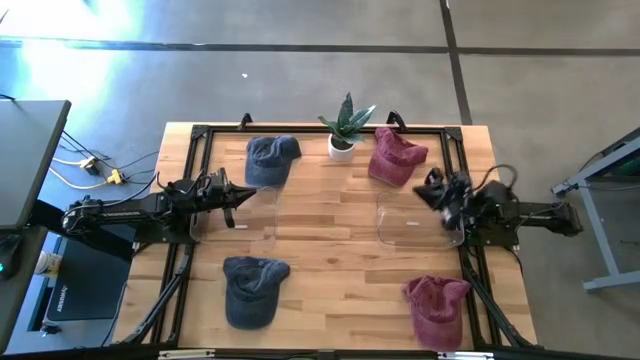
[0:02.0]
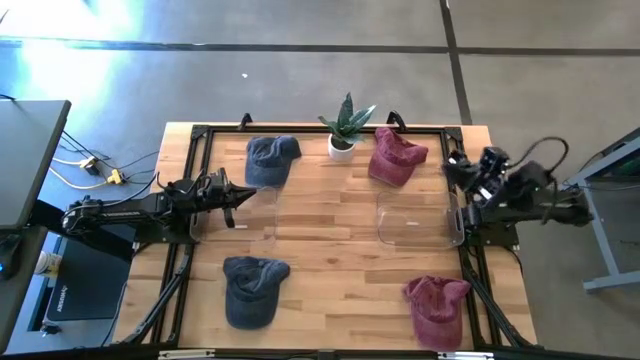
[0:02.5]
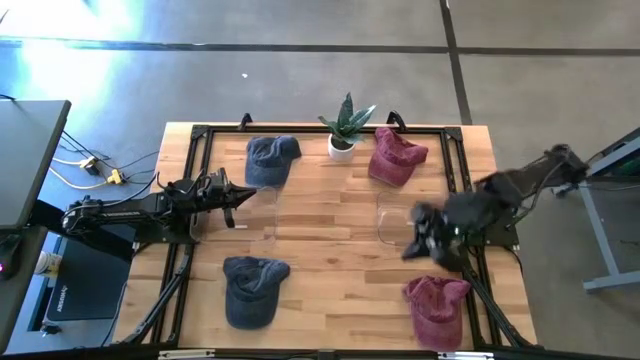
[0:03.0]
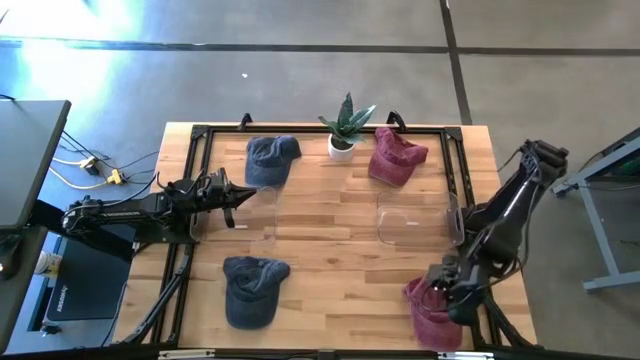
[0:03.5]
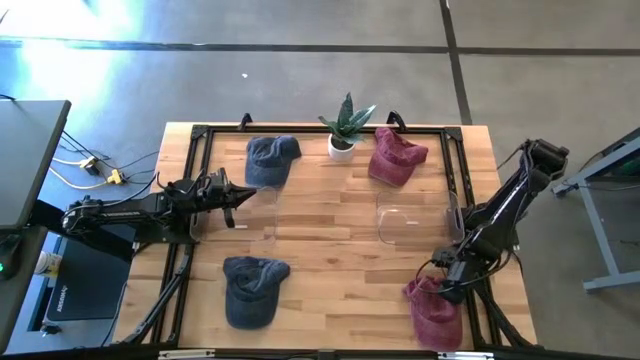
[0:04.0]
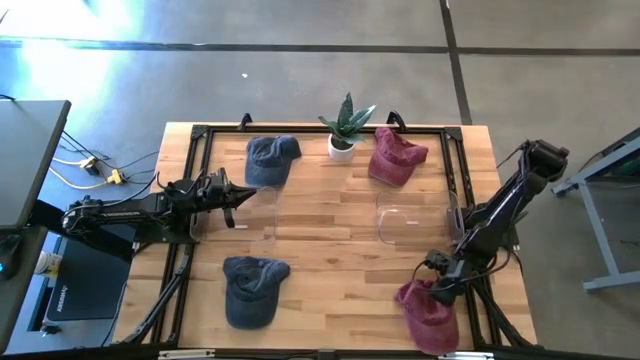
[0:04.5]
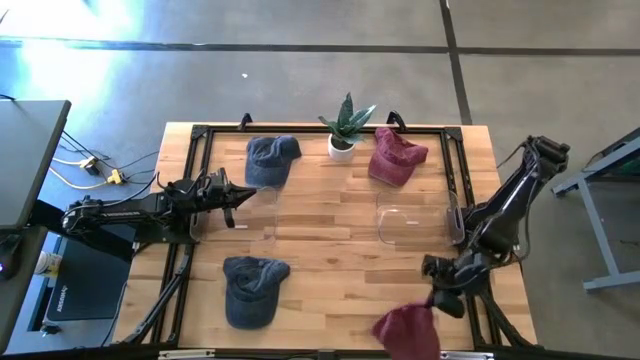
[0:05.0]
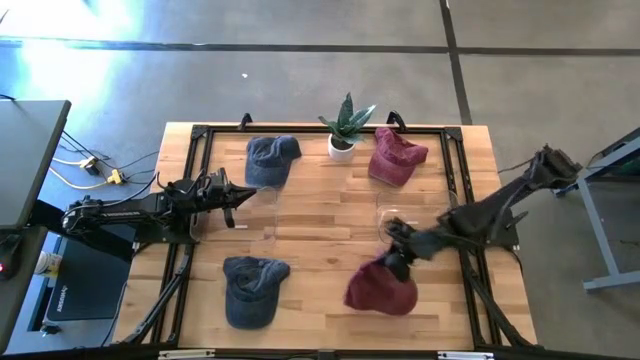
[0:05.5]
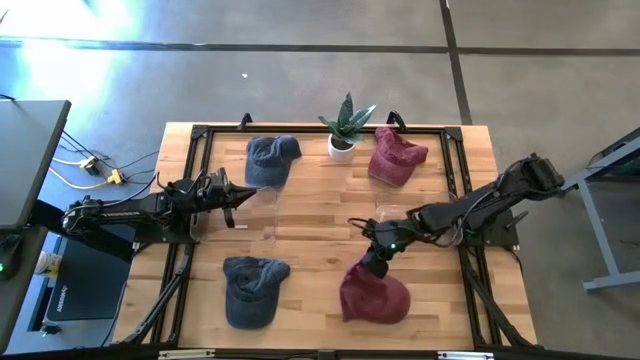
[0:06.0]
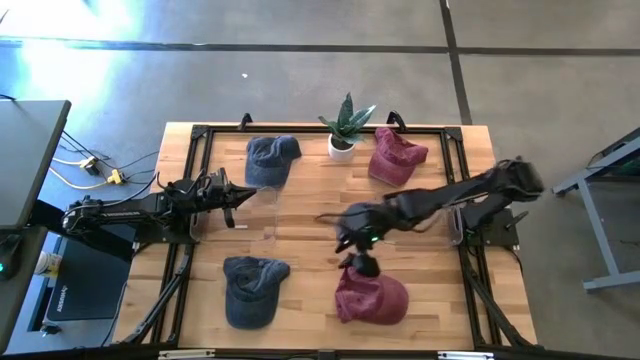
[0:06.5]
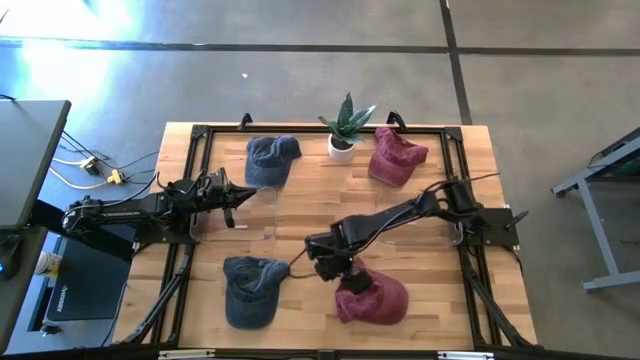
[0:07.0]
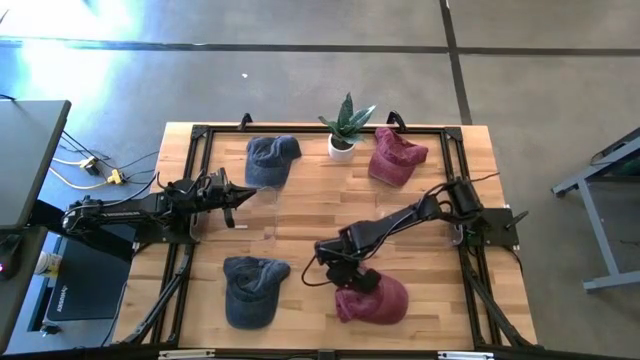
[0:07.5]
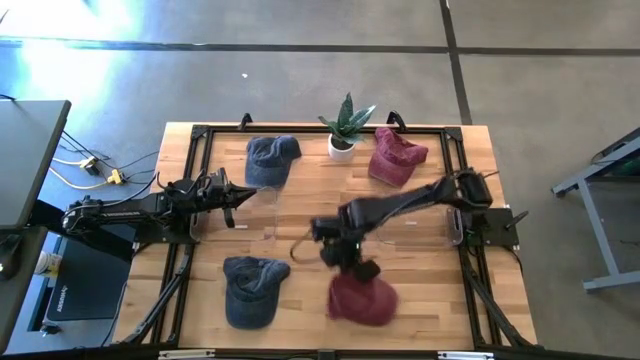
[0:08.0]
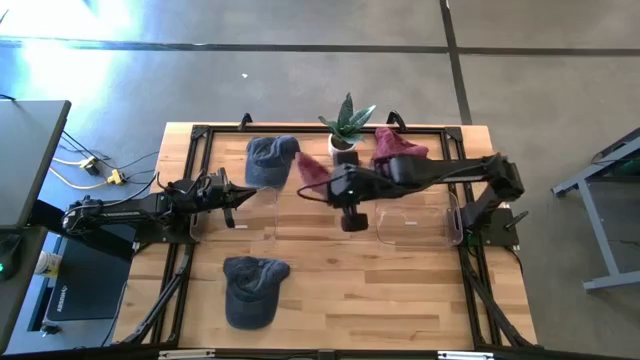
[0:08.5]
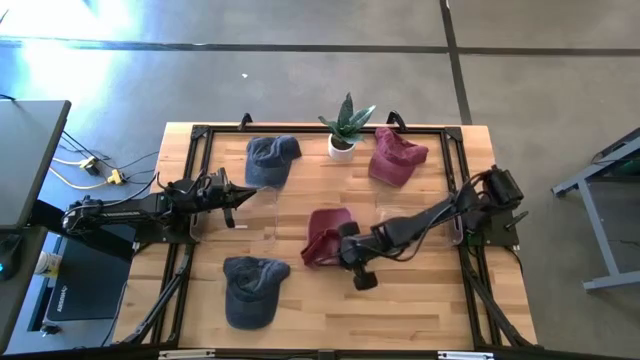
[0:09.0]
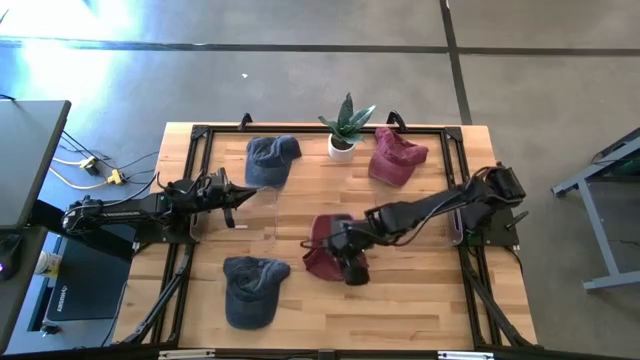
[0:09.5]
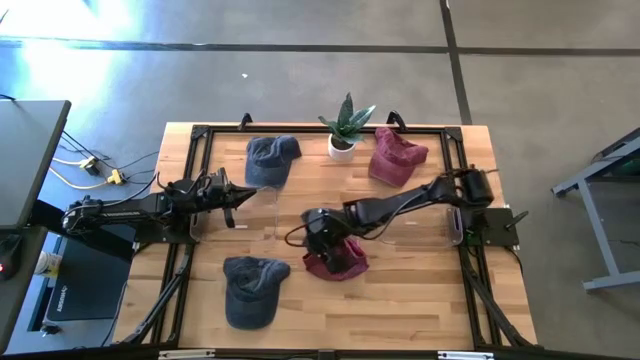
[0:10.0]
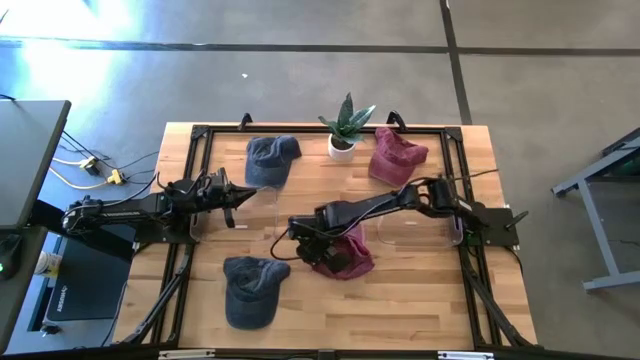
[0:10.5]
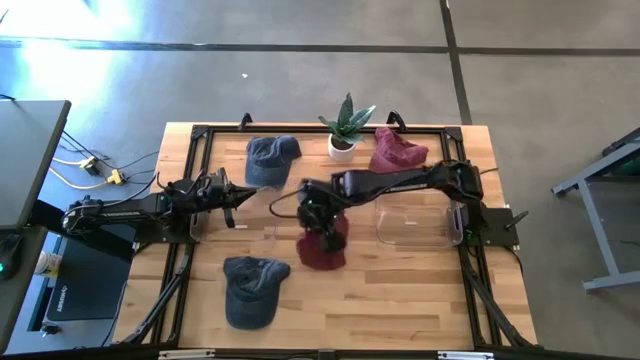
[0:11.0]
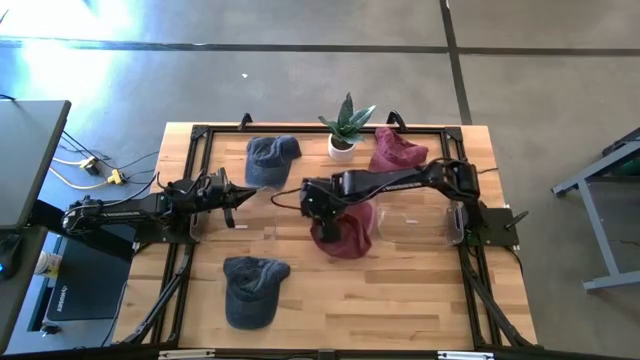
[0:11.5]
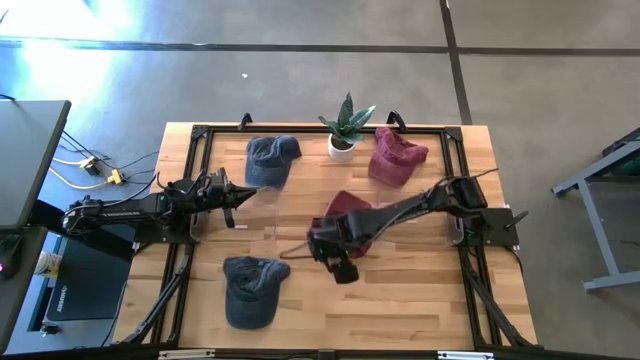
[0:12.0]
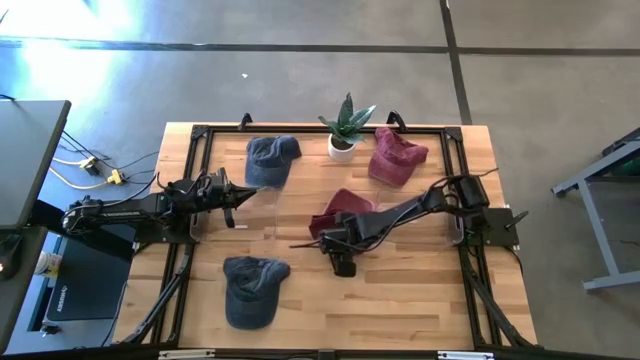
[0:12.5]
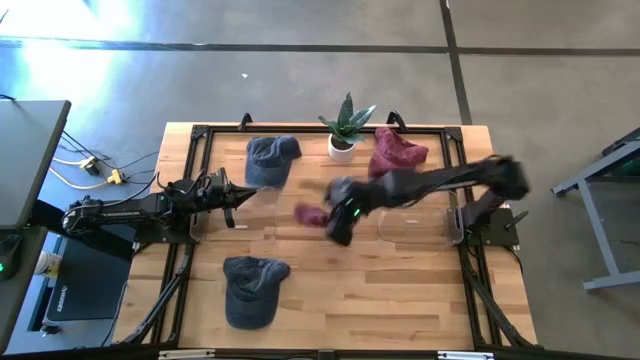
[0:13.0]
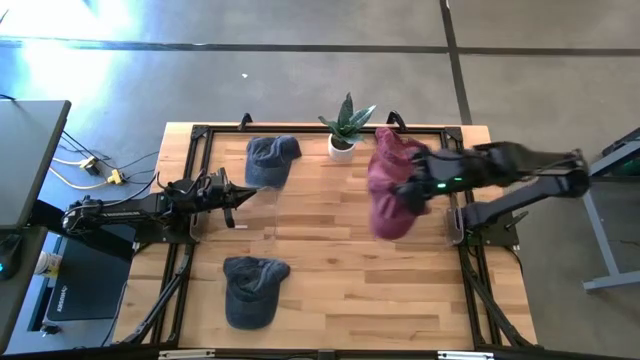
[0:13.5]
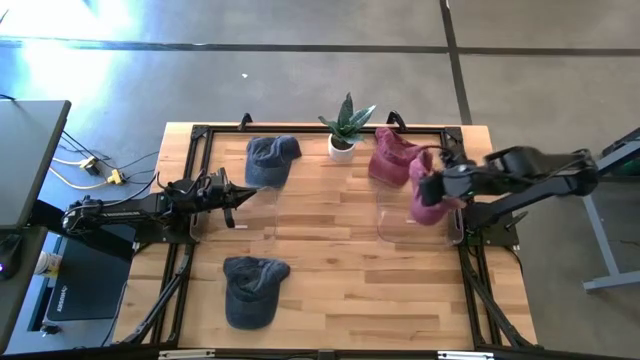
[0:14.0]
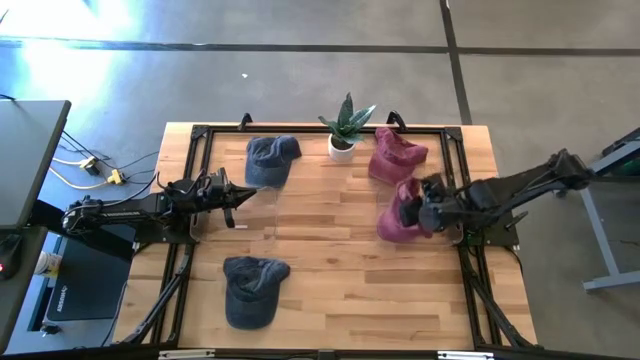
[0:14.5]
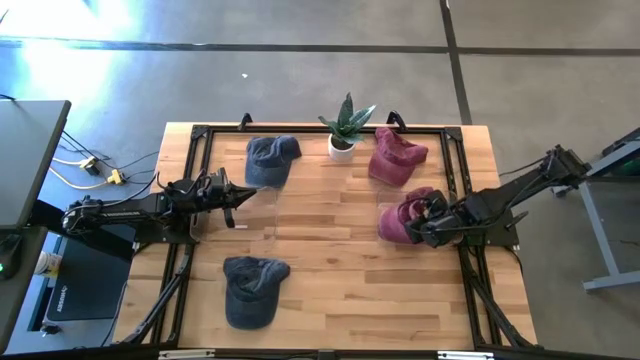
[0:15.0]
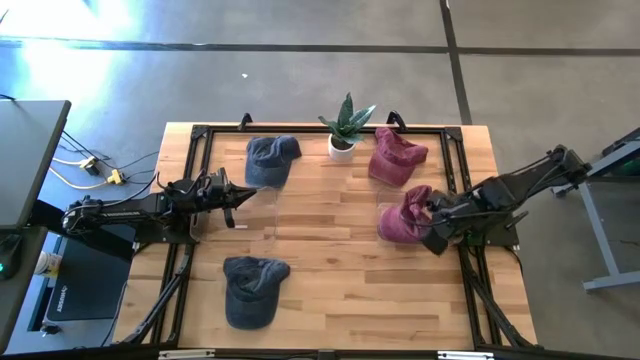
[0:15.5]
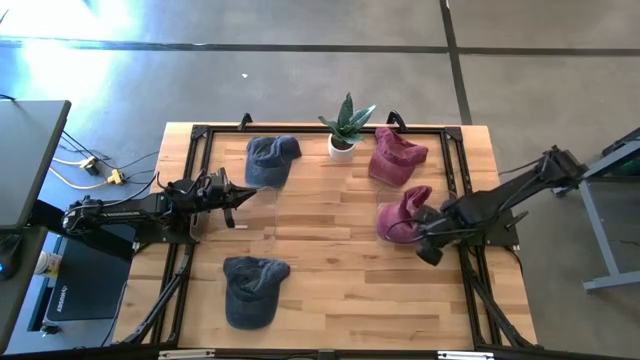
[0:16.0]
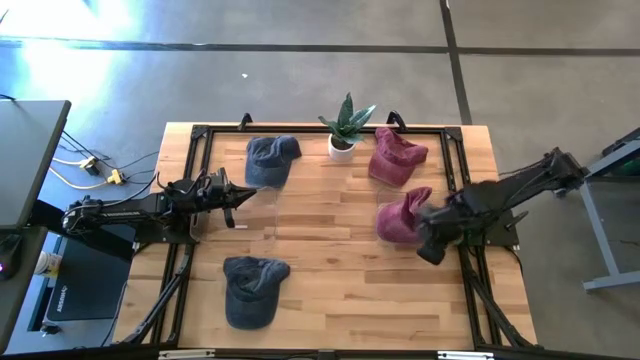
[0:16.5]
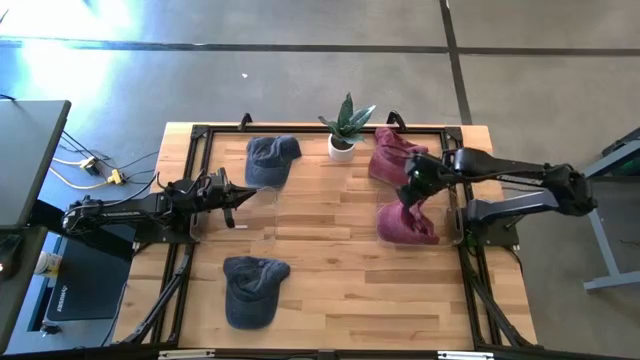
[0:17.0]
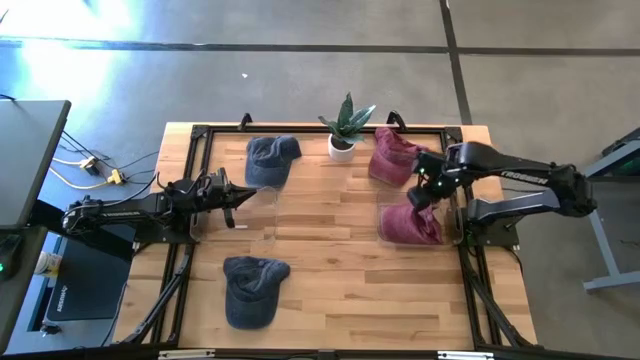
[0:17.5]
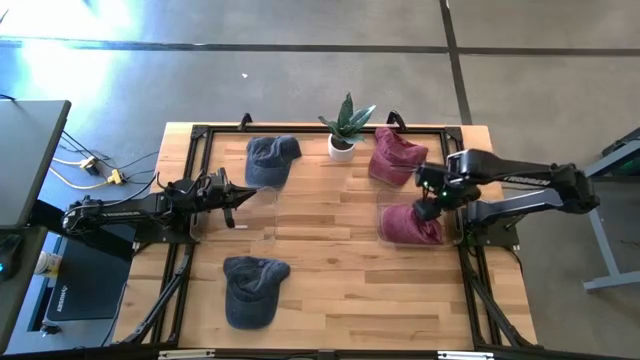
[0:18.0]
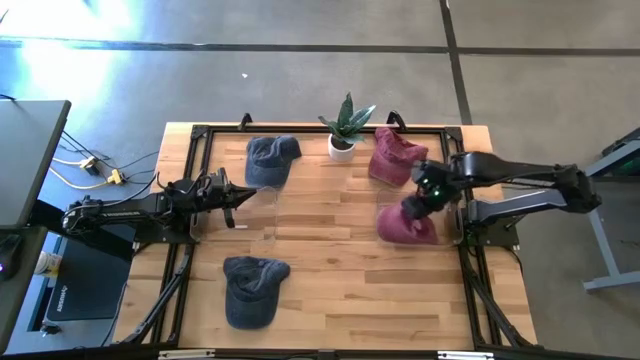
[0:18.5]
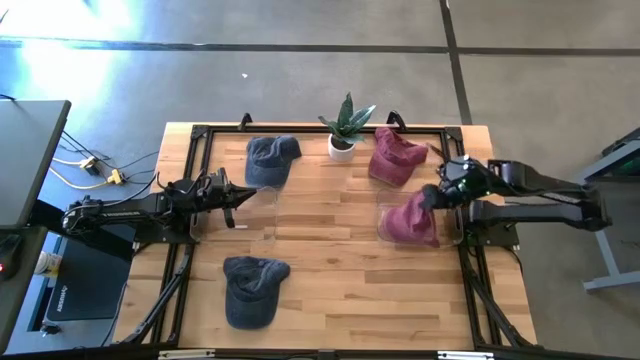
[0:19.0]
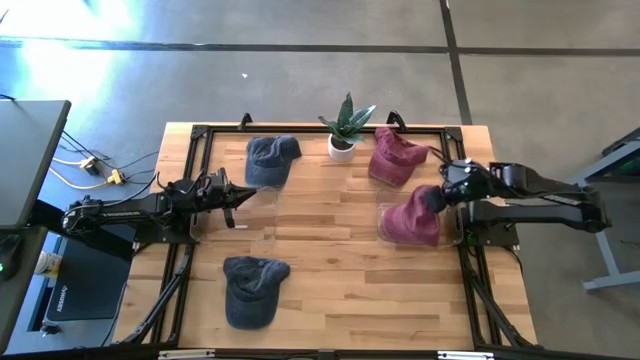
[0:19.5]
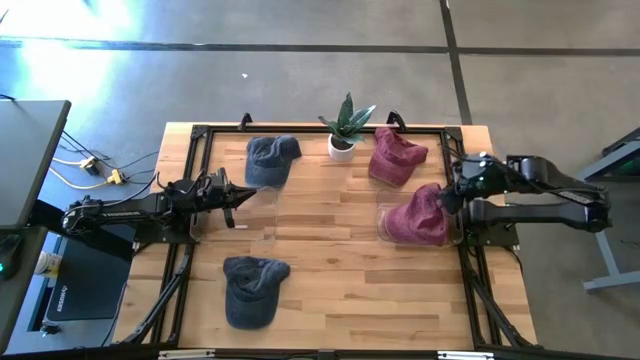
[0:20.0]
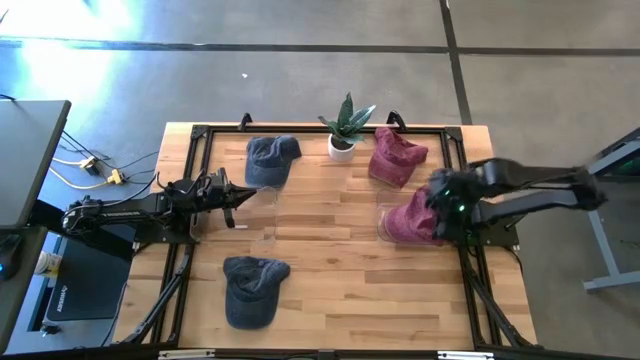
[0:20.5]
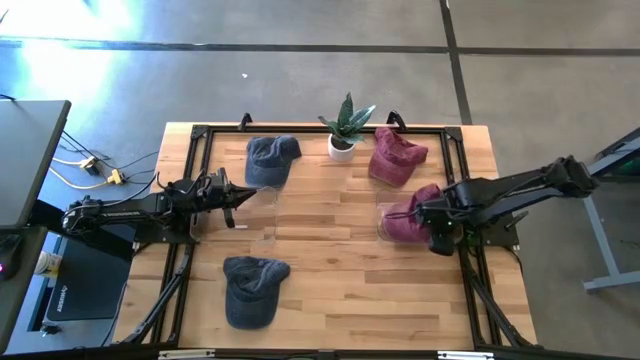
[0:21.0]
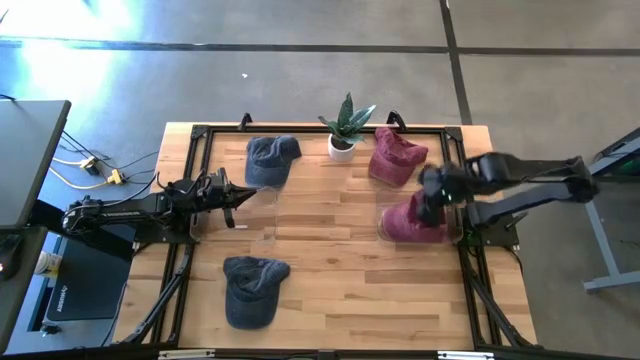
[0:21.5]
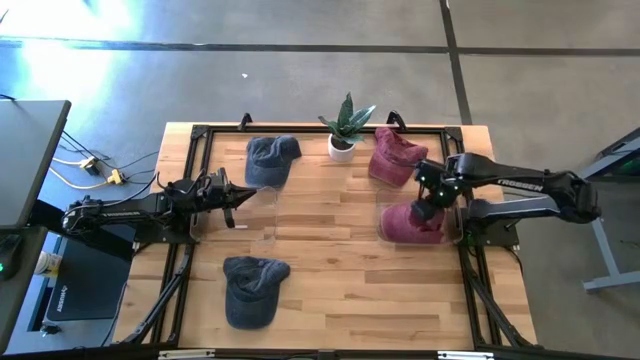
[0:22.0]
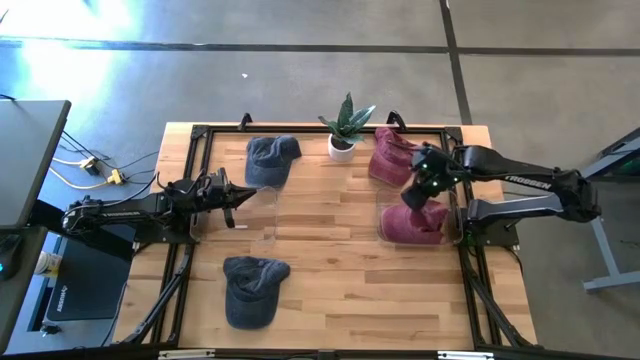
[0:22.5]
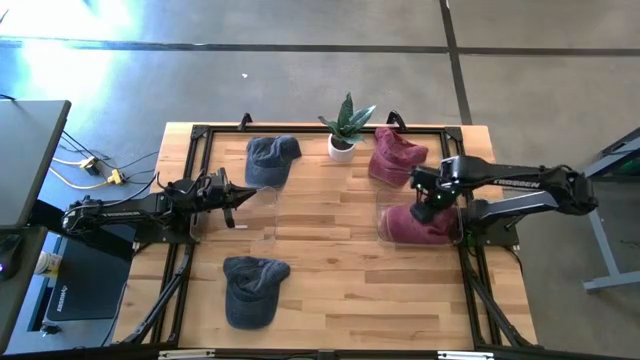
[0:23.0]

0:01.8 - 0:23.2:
Task: Pick & Place hat
Put the bottom red cap into the right transparent bin
